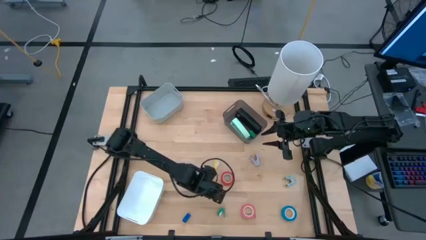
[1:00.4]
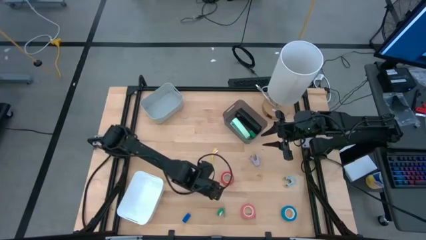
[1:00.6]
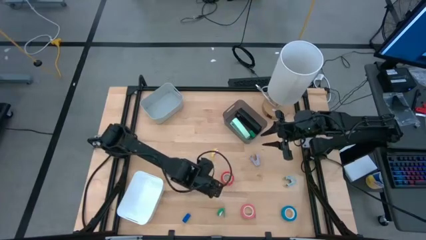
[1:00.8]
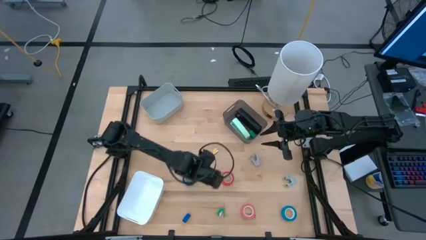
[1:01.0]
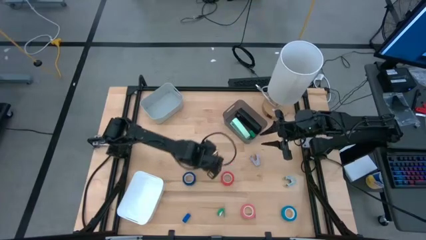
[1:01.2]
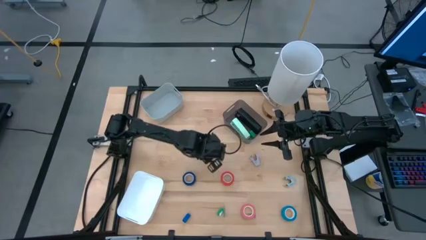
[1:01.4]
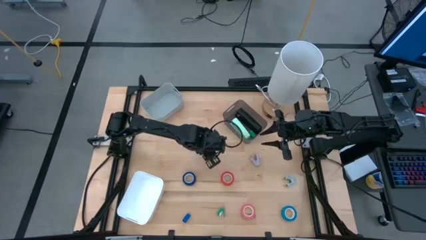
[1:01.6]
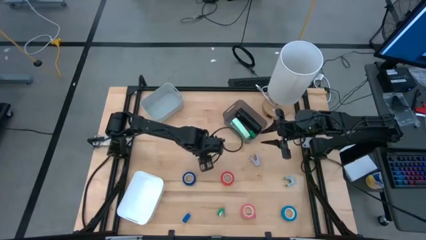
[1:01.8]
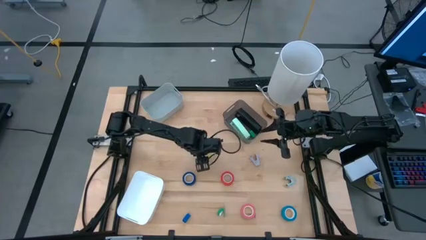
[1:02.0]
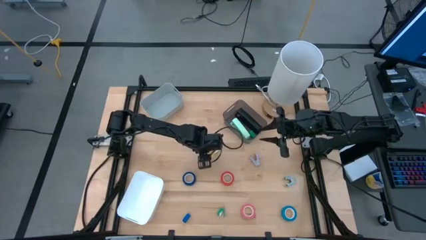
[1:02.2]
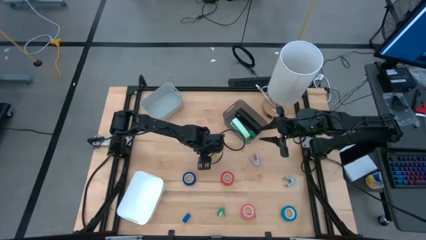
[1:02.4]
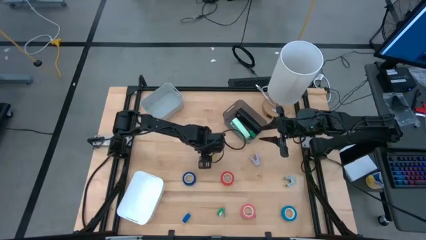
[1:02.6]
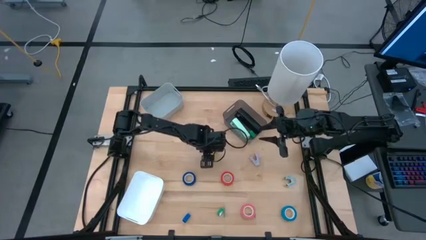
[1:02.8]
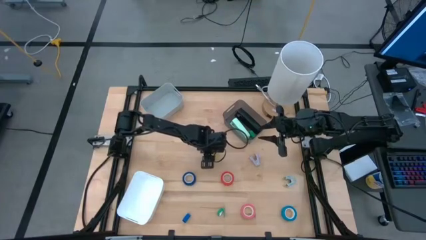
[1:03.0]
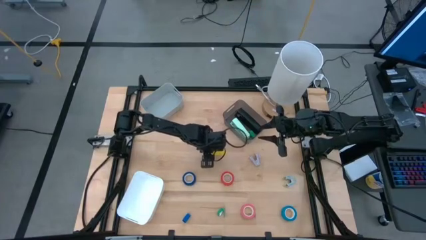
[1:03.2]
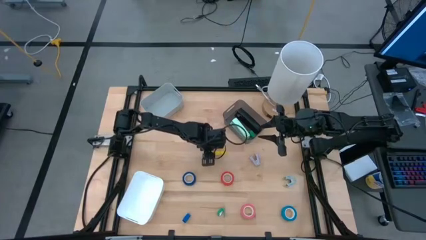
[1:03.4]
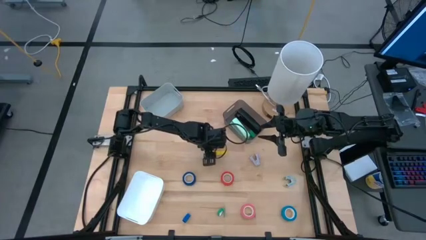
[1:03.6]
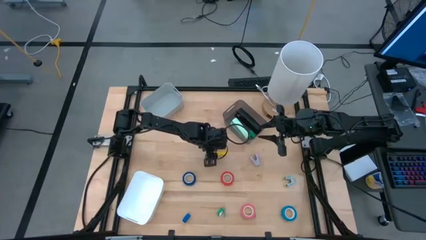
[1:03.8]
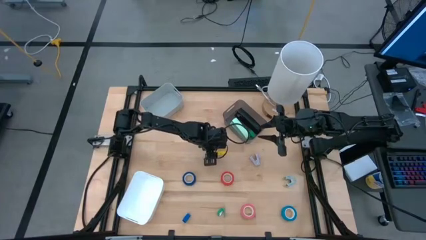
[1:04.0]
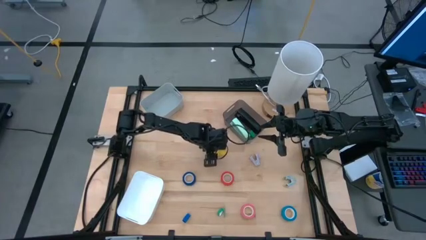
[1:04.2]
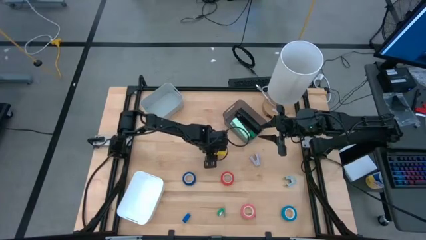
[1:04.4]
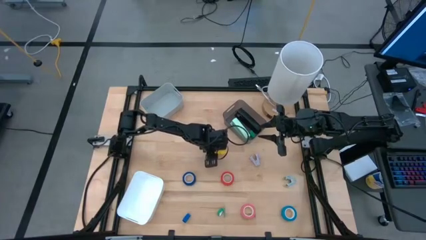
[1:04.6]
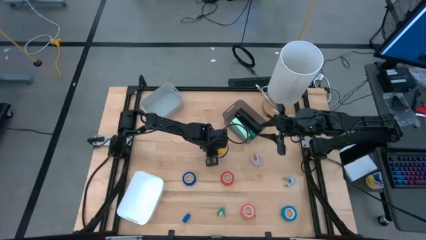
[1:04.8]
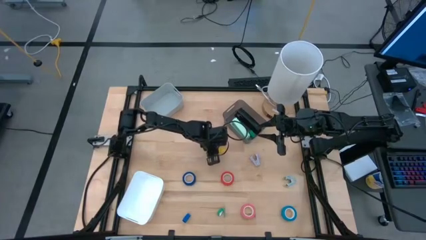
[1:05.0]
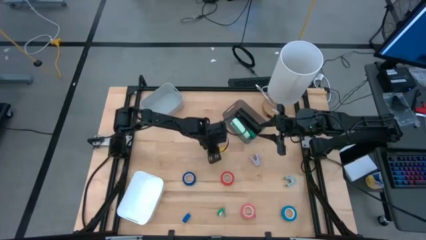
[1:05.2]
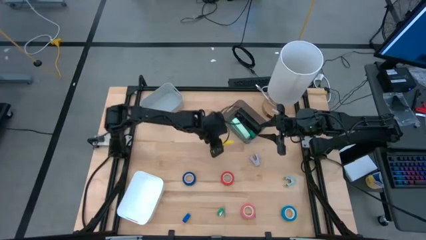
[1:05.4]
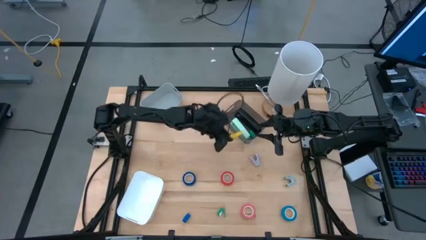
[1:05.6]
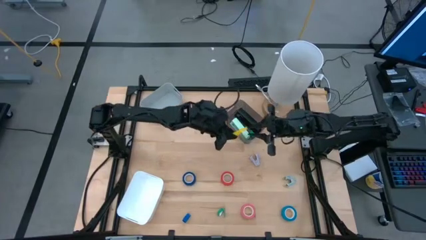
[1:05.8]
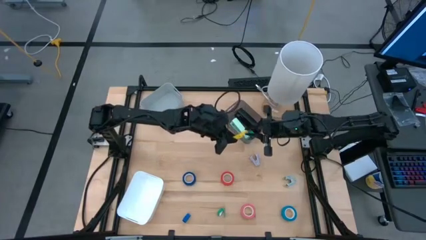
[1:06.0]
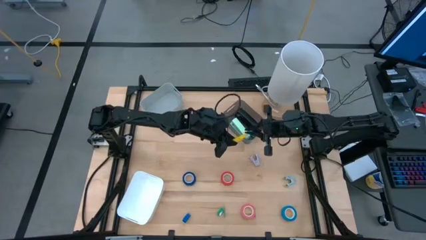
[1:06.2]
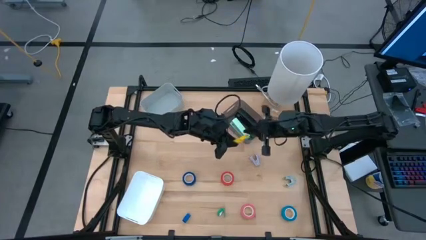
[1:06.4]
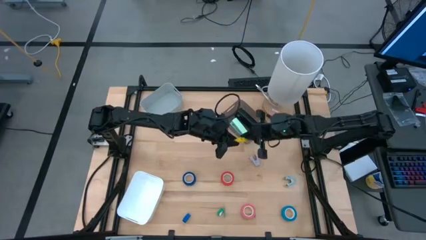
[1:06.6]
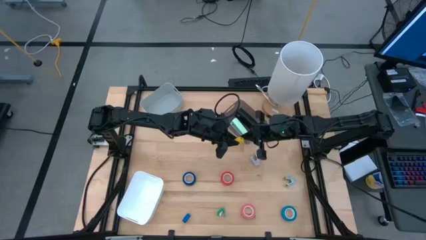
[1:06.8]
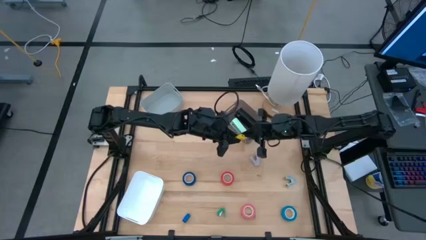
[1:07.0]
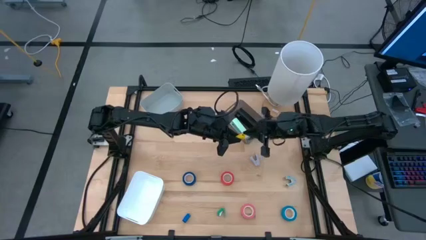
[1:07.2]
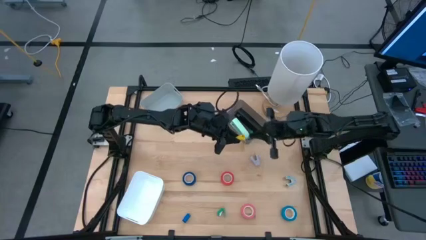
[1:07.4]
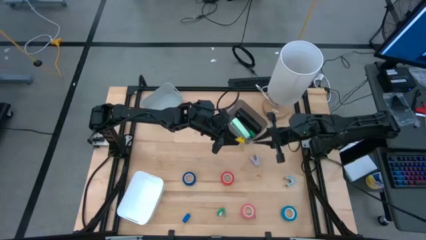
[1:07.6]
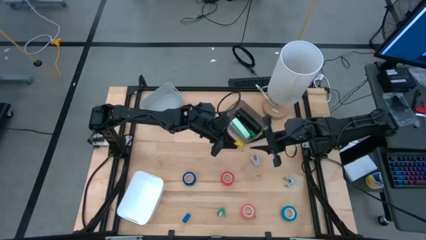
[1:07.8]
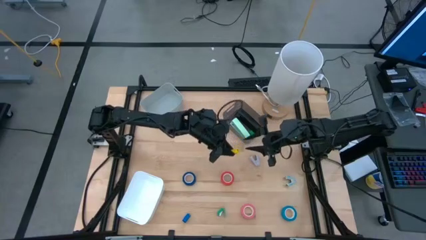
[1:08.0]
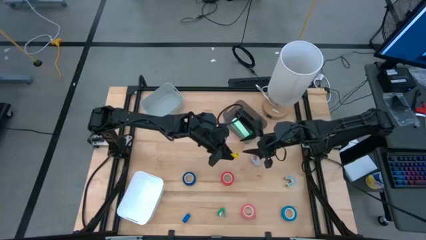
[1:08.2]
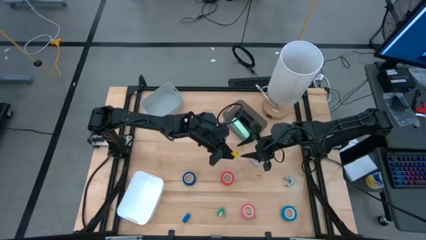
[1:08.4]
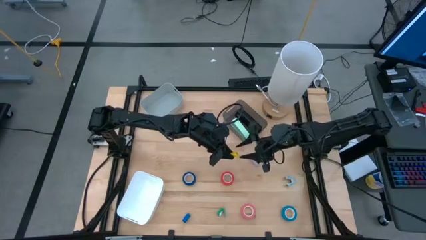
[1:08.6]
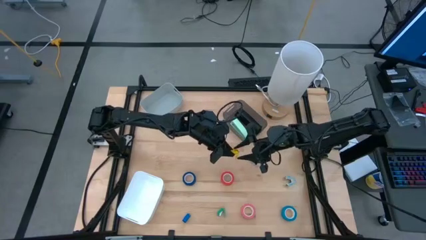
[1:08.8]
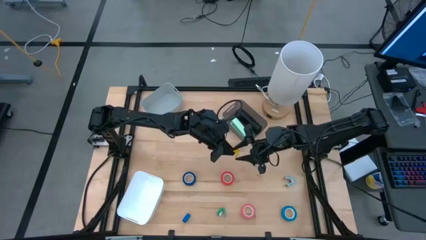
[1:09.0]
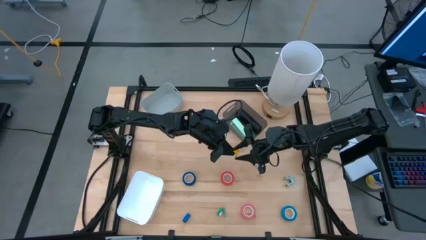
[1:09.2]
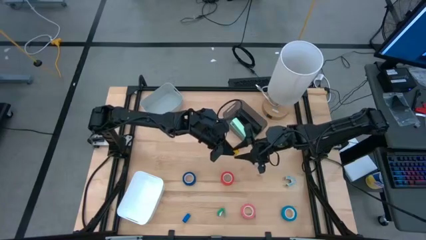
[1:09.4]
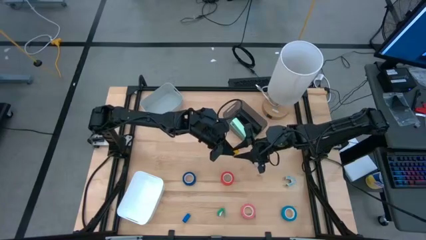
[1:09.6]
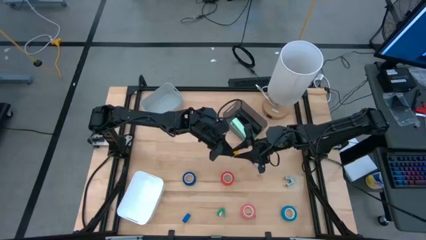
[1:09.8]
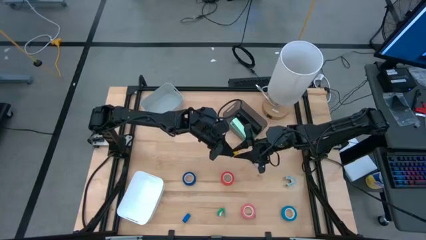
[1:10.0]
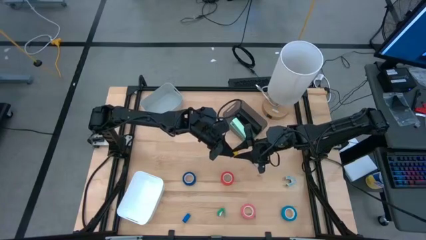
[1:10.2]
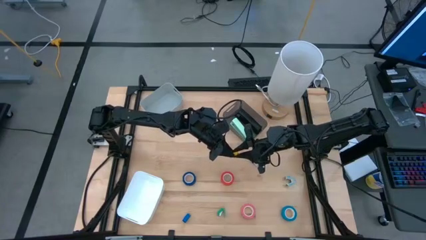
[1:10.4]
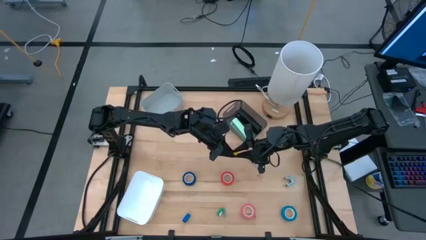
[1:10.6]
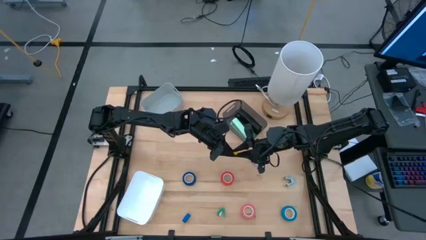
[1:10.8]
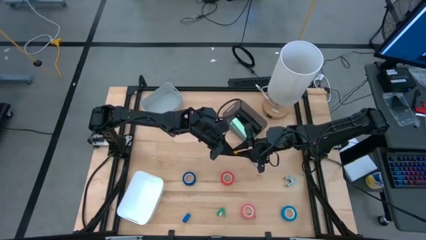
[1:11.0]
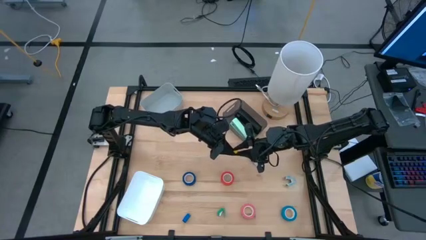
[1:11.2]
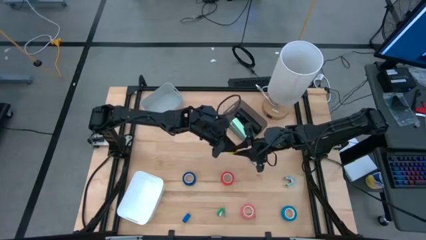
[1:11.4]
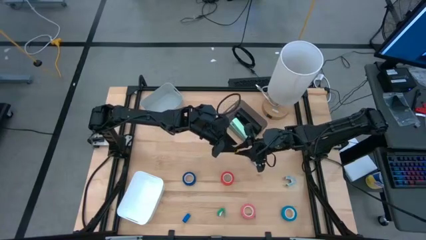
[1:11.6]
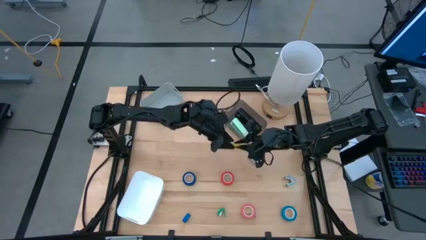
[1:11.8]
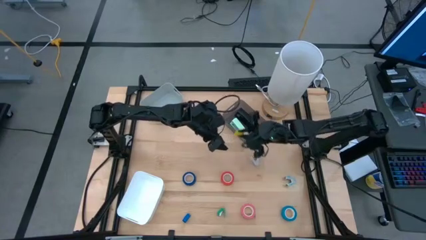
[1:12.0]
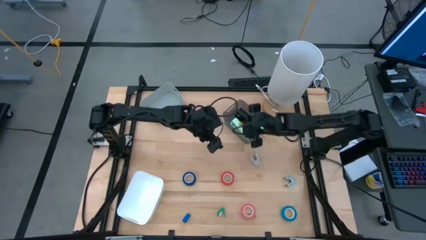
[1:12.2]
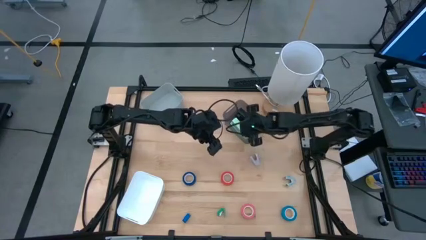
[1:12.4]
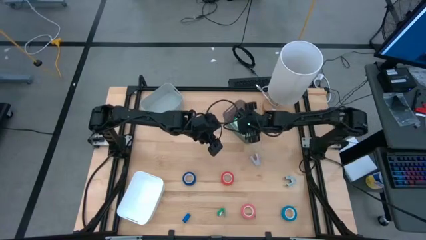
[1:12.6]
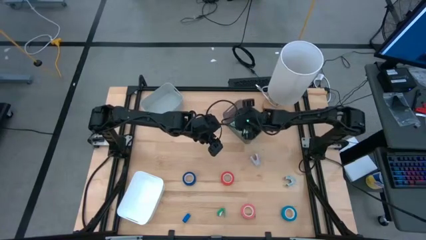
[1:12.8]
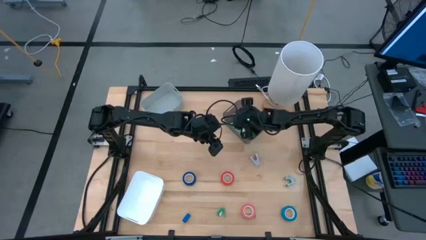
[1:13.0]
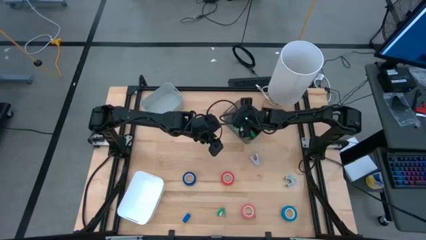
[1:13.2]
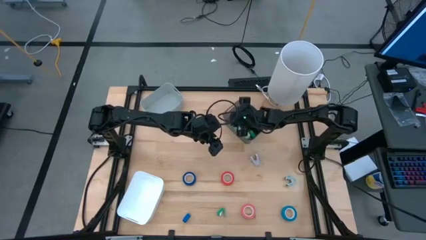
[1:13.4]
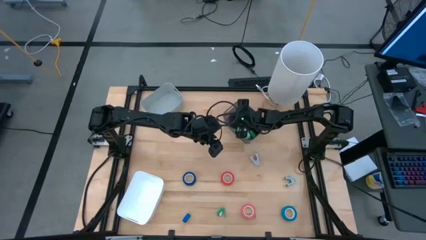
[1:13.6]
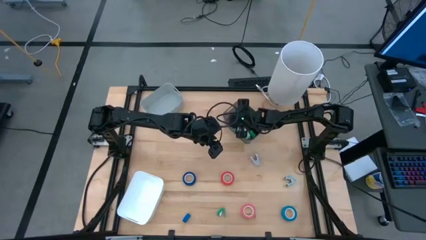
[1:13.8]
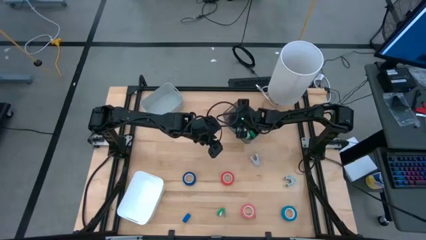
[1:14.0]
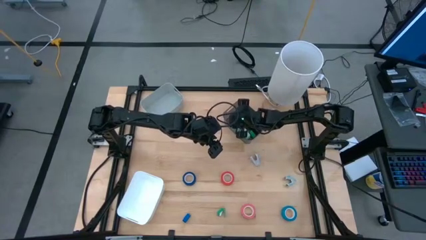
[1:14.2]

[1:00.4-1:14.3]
Task: Pick and place Stapler, Stapler remover, tape
Put the small yellow stapler into the black bin

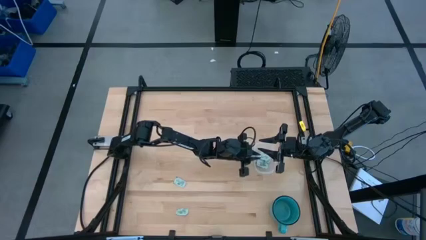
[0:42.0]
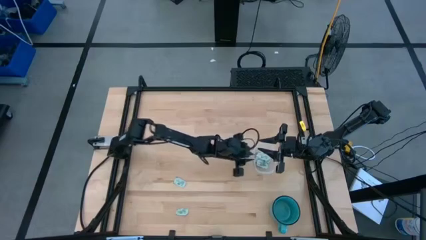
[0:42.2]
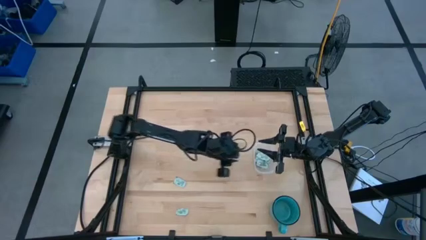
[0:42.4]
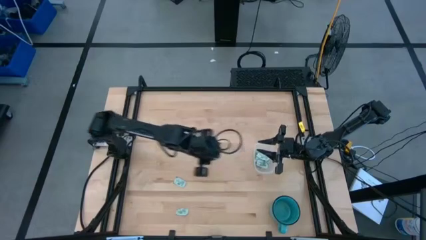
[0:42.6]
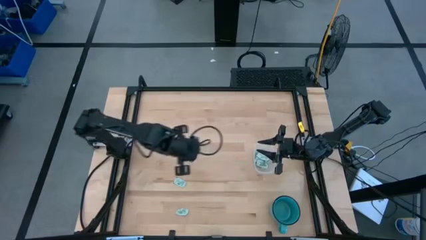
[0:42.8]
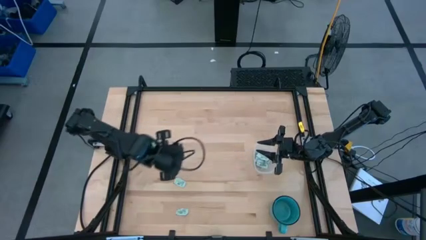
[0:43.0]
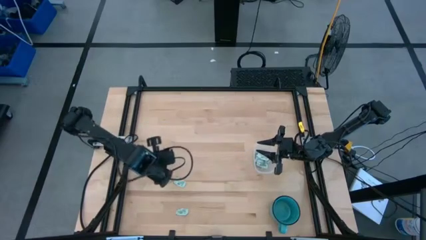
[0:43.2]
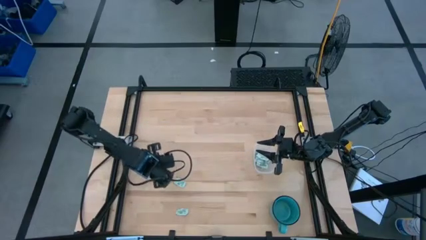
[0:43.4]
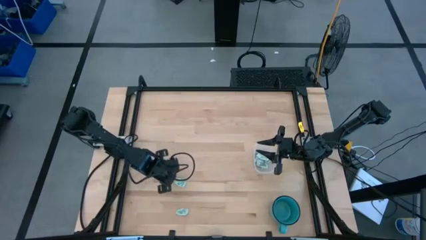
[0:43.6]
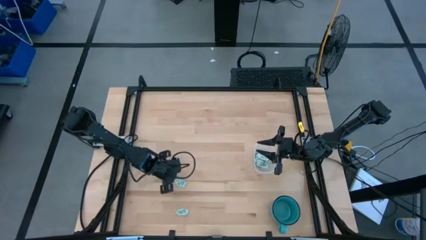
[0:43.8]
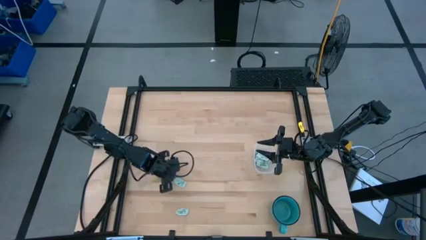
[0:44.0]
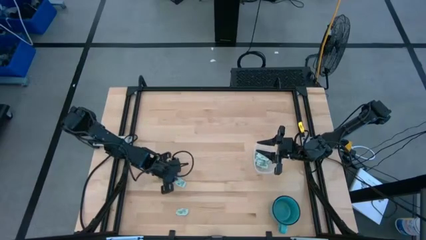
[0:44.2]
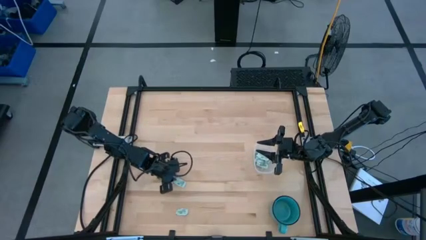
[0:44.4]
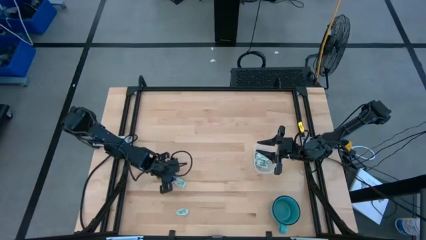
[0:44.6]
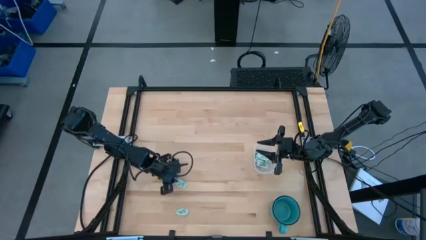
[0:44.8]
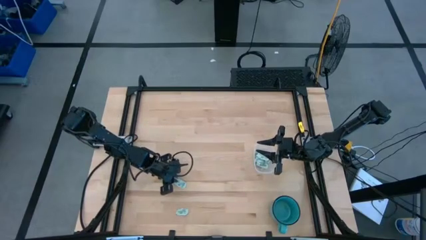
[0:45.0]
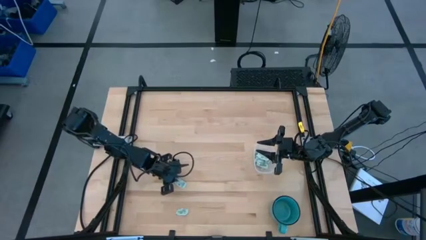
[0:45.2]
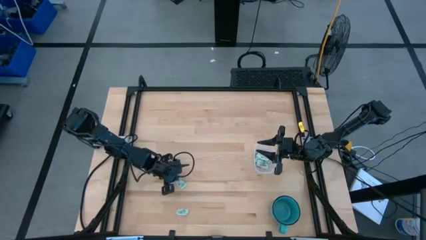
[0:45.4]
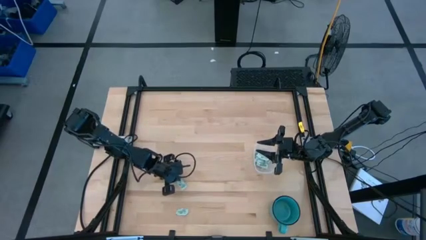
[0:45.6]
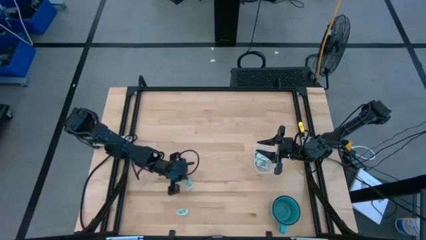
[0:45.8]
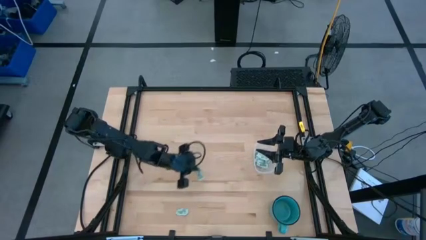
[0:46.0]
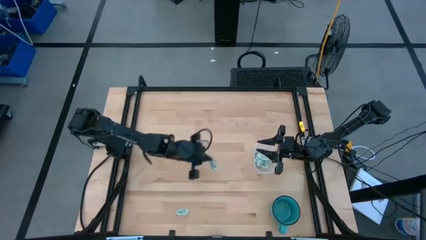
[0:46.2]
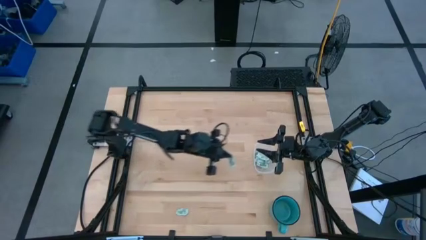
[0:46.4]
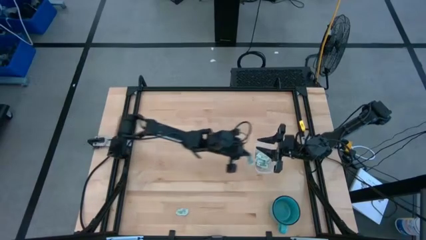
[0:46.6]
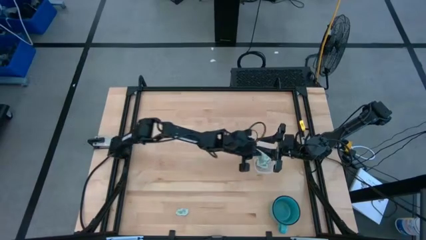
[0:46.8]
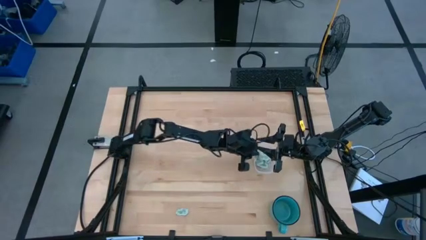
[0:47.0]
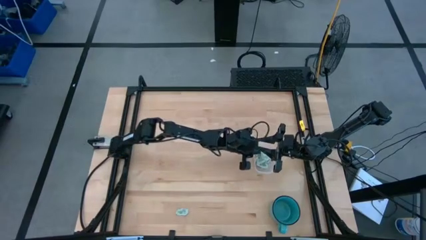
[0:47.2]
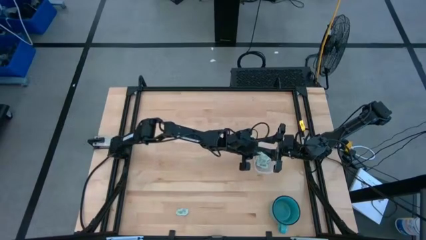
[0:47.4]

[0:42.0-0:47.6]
Task: Pick and place Stevia / Truvia into bins
Put the stevia packet into the bin
